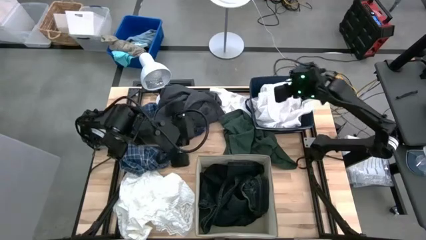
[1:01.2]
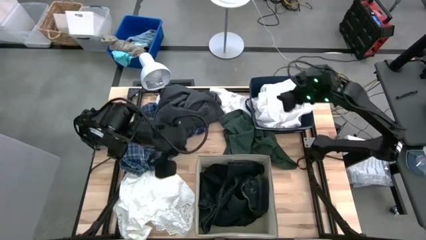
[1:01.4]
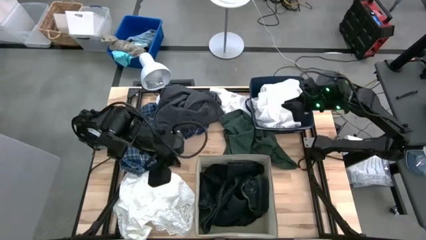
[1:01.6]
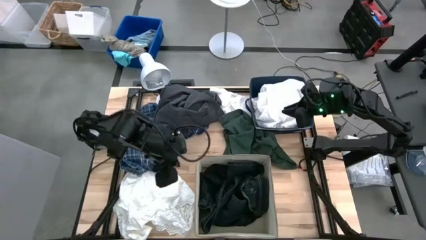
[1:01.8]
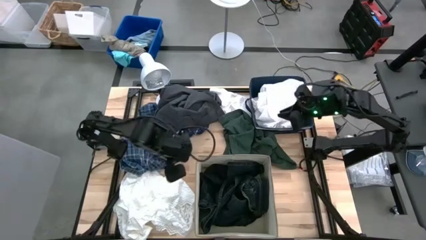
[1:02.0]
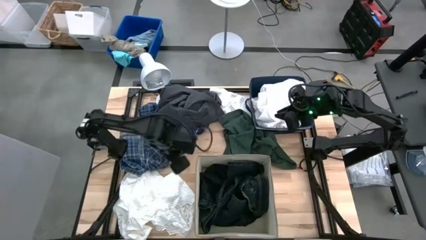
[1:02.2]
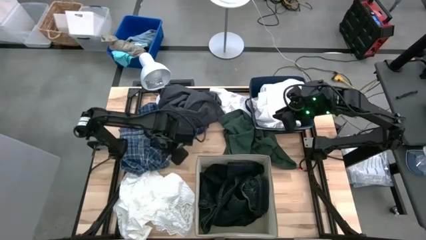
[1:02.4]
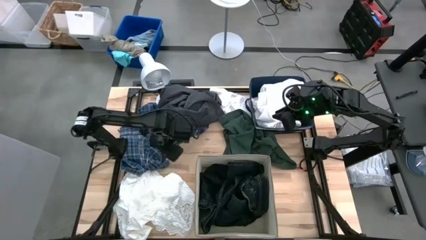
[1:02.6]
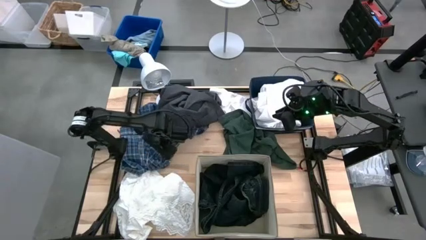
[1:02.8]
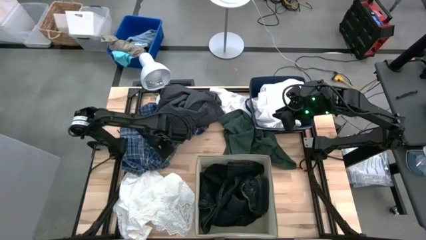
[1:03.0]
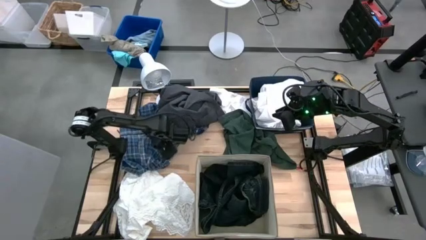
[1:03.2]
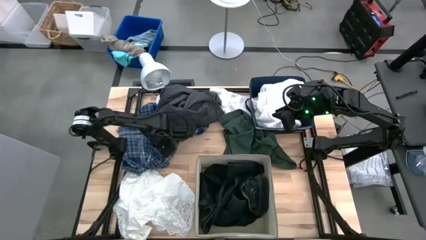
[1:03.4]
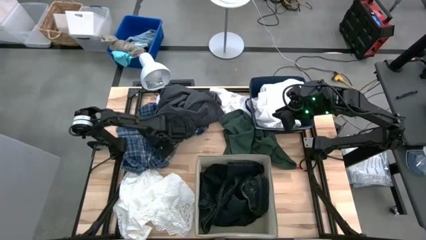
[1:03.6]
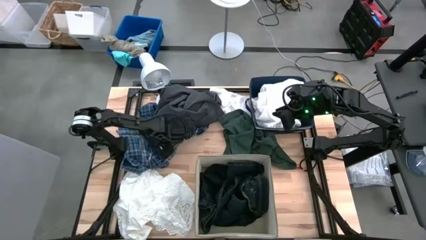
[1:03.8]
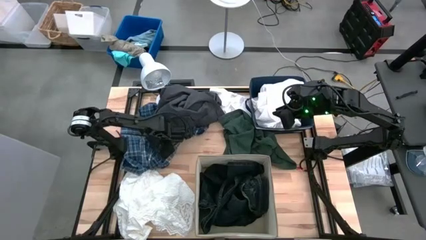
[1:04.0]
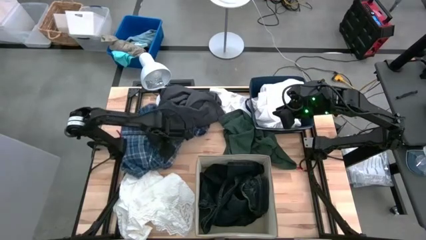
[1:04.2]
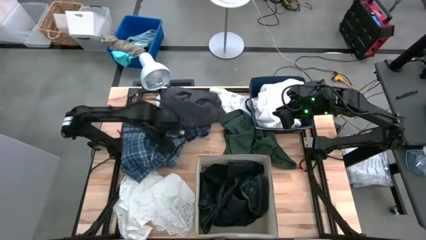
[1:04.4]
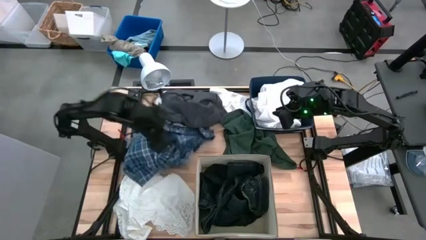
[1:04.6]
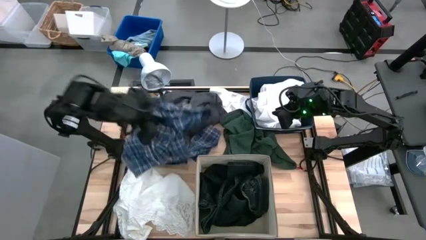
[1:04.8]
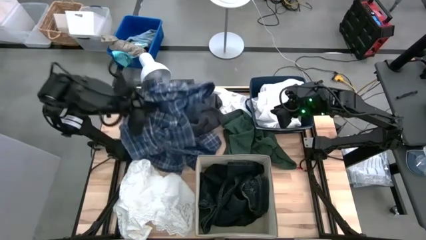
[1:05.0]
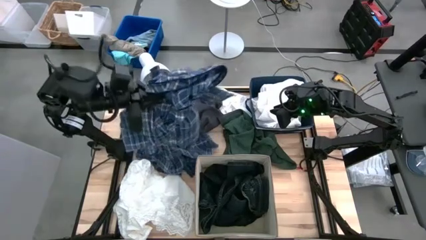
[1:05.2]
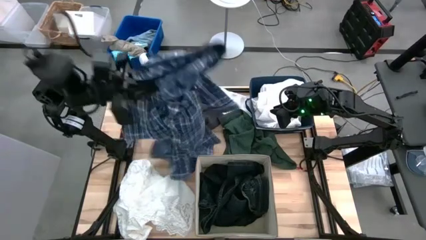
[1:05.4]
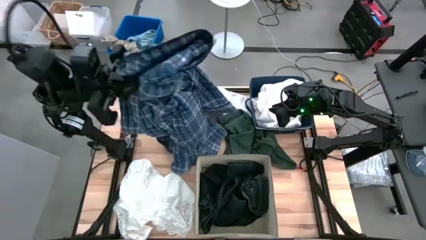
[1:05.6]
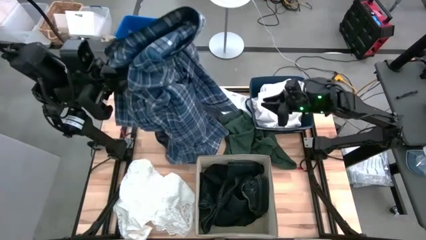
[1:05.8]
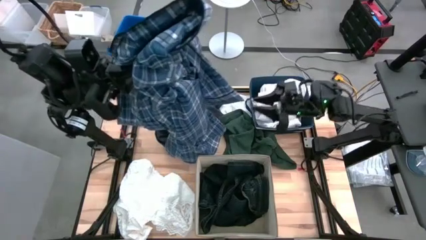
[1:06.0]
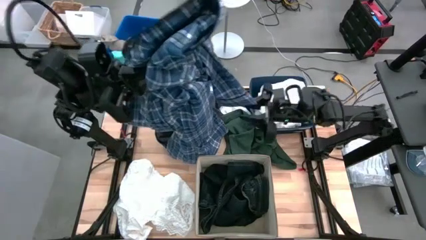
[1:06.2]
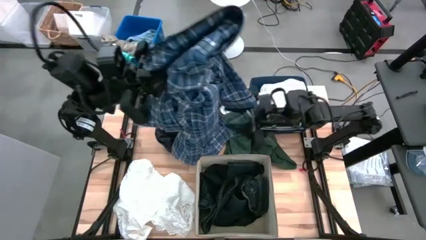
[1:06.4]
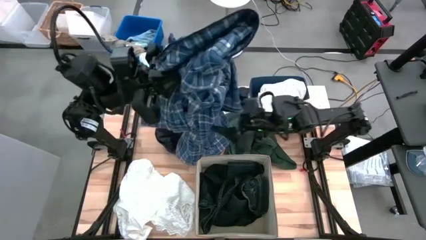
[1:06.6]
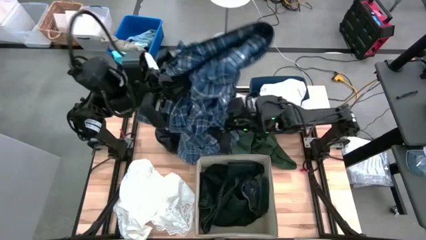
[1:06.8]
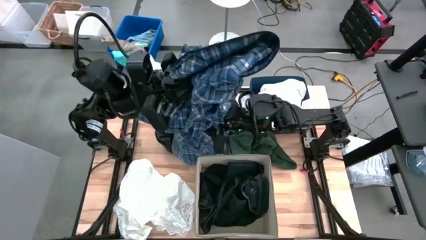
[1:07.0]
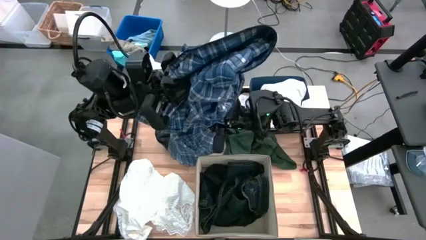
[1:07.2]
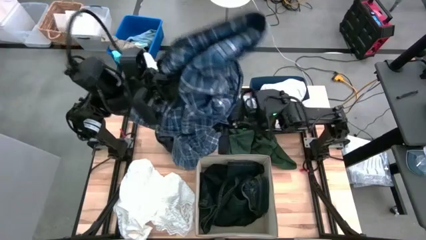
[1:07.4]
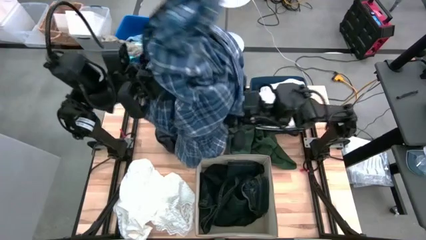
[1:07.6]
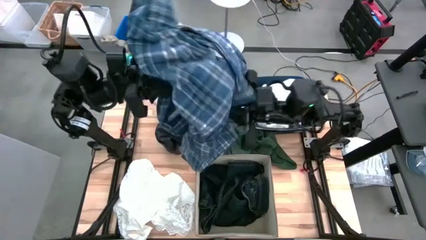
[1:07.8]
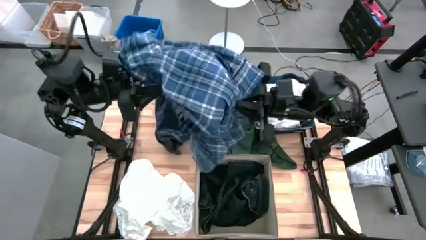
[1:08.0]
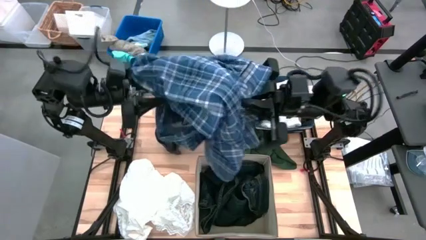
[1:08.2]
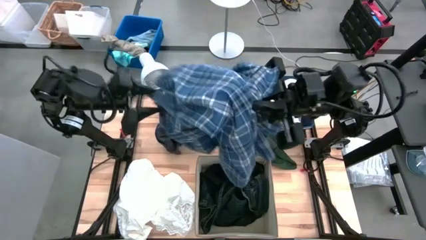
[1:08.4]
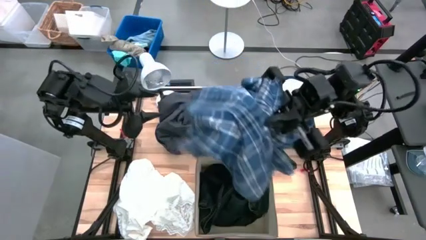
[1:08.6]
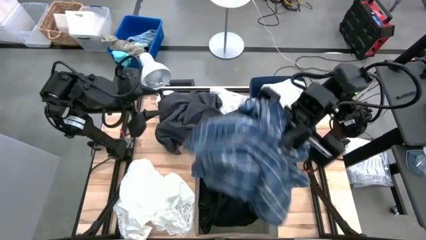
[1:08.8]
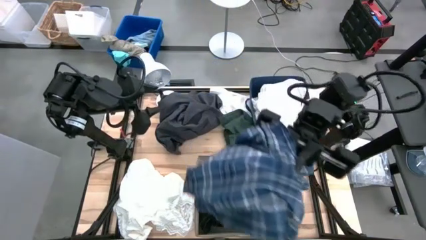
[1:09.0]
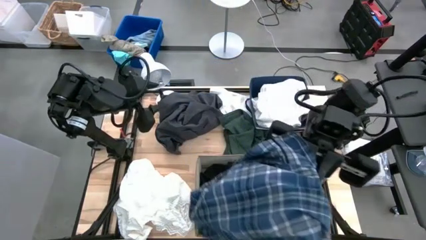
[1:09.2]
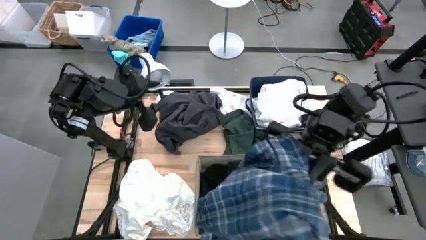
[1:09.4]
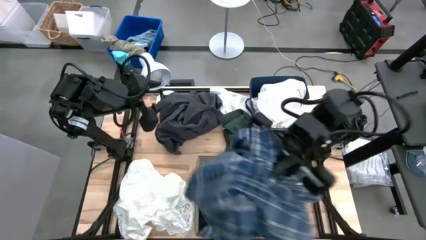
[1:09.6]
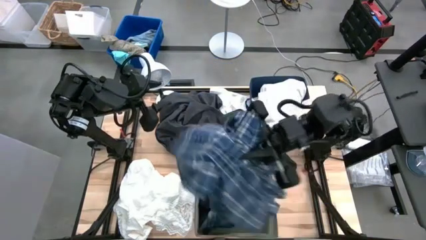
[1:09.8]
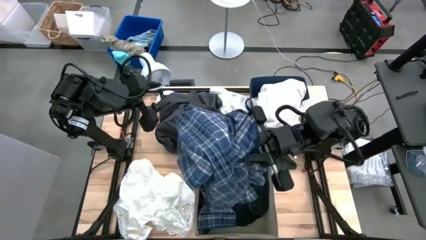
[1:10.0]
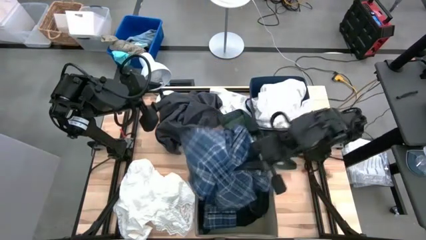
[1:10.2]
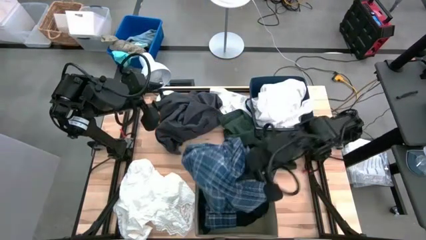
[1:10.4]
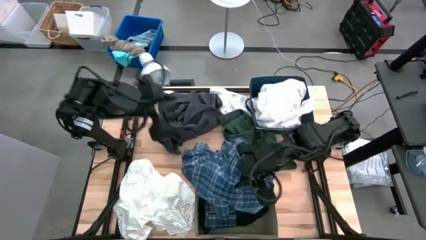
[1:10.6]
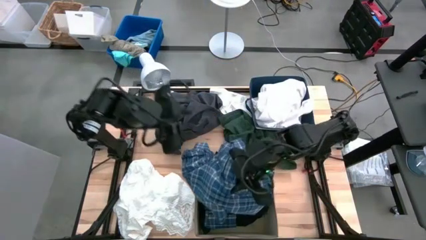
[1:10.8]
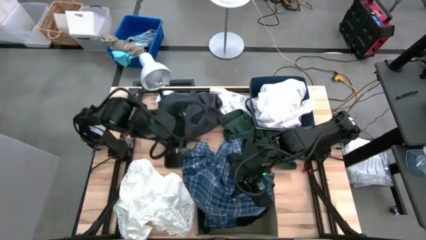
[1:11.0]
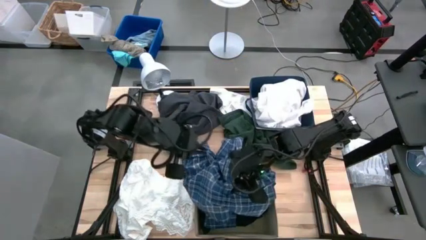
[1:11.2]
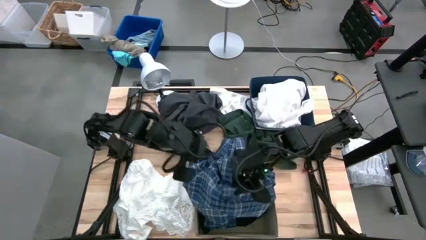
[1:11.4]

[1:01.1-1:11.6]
Task: Sort clothes
Put the blue checkered polo shirt into the brown laundry organizer

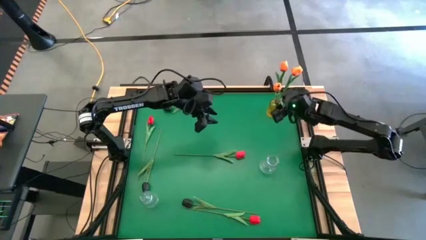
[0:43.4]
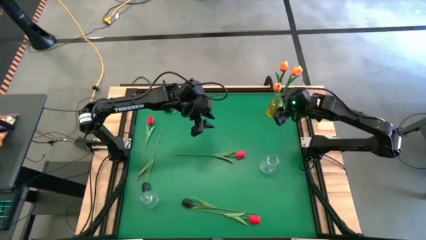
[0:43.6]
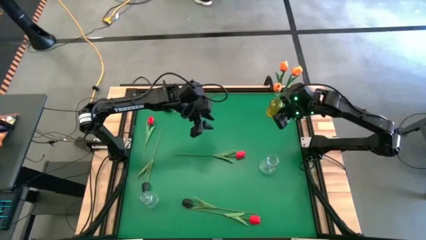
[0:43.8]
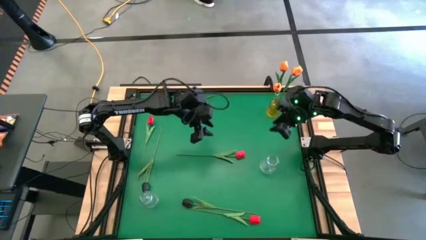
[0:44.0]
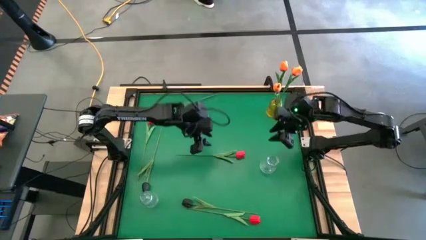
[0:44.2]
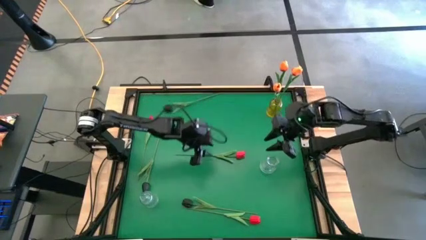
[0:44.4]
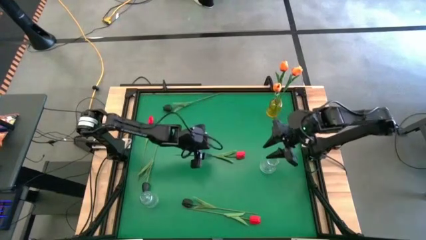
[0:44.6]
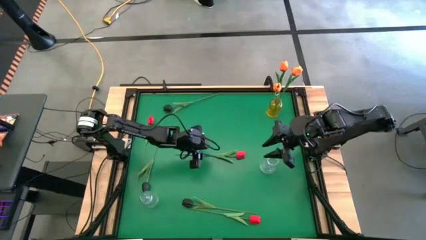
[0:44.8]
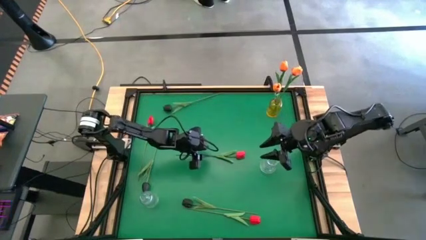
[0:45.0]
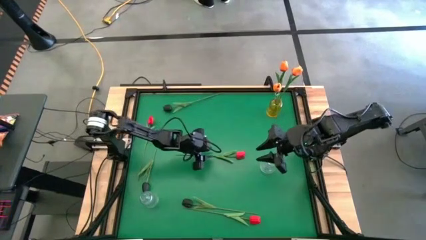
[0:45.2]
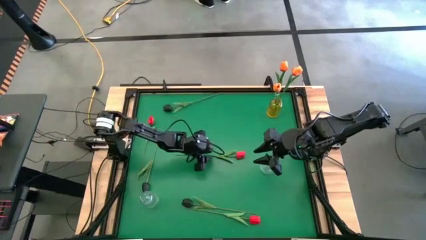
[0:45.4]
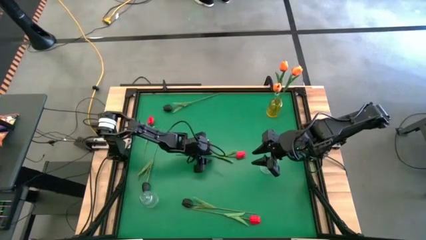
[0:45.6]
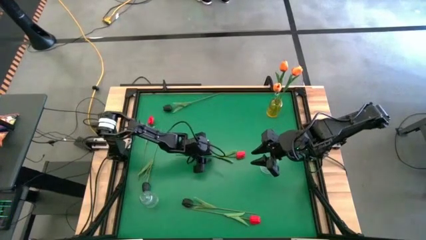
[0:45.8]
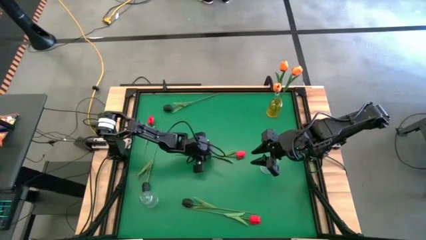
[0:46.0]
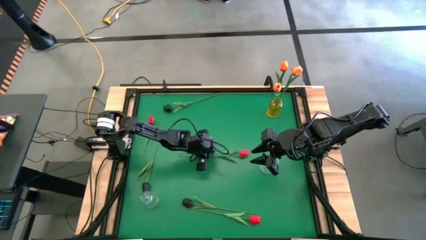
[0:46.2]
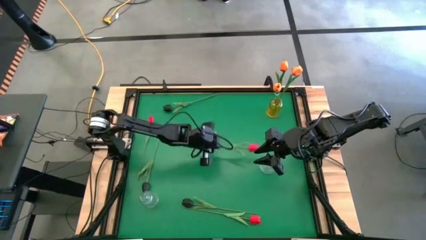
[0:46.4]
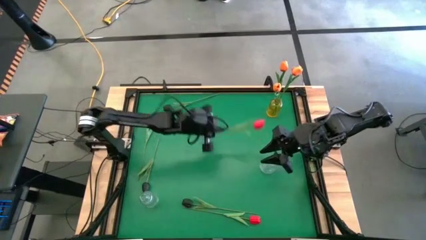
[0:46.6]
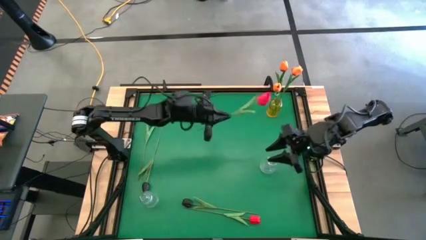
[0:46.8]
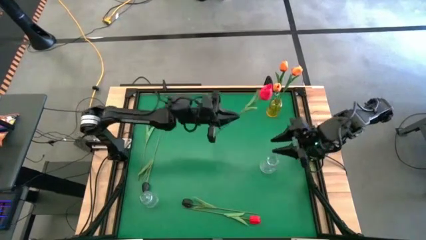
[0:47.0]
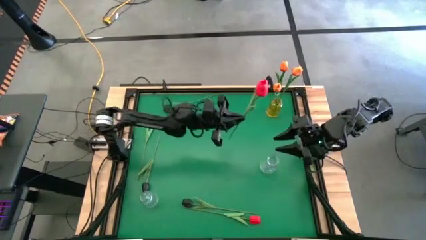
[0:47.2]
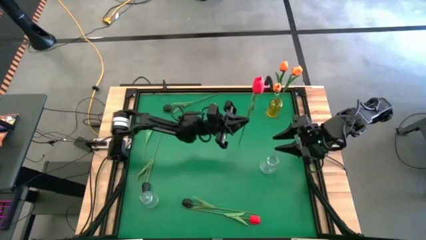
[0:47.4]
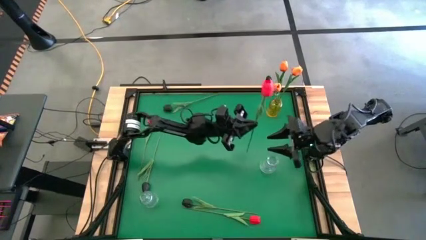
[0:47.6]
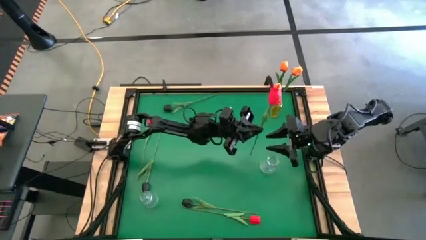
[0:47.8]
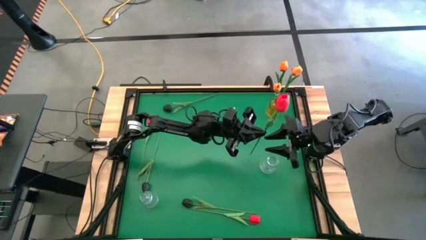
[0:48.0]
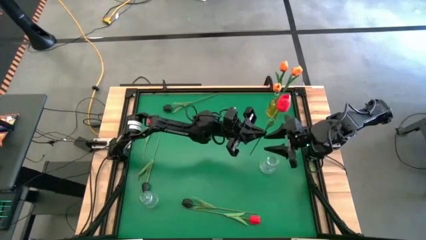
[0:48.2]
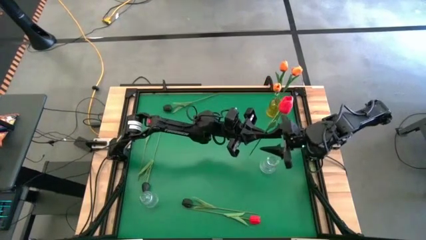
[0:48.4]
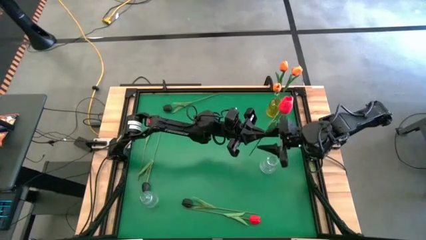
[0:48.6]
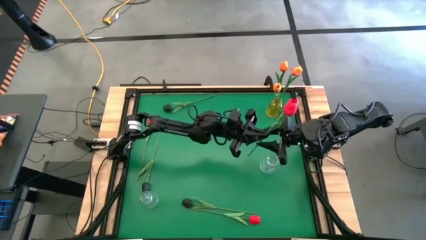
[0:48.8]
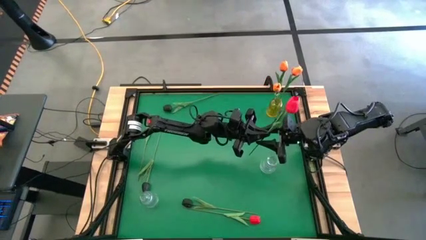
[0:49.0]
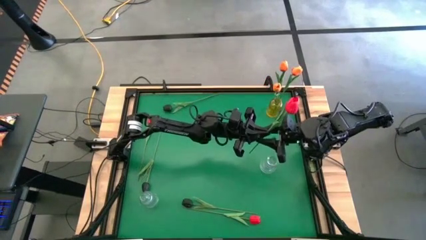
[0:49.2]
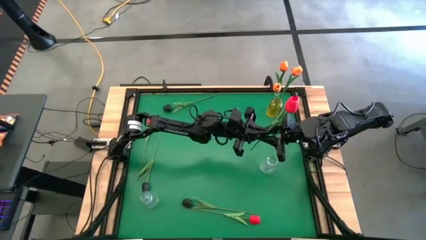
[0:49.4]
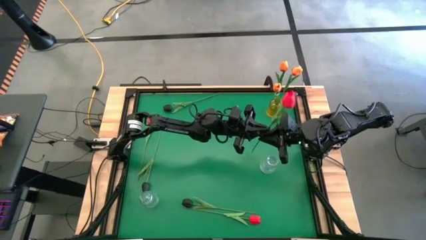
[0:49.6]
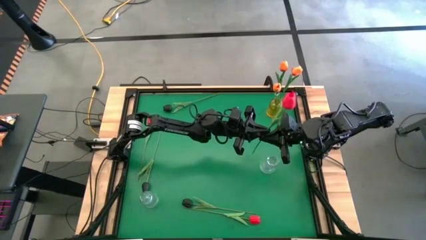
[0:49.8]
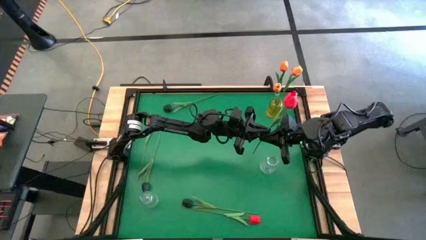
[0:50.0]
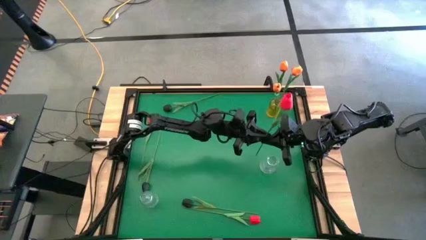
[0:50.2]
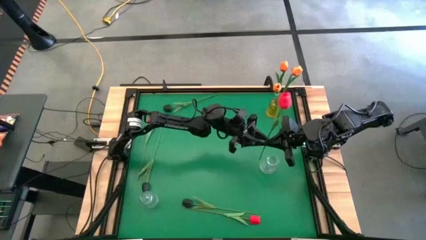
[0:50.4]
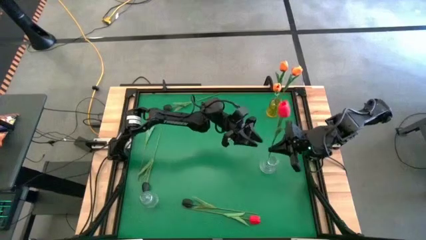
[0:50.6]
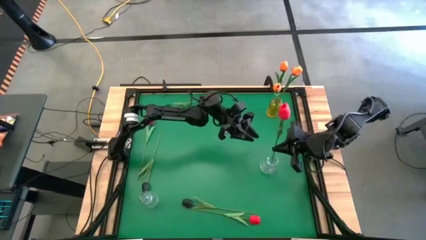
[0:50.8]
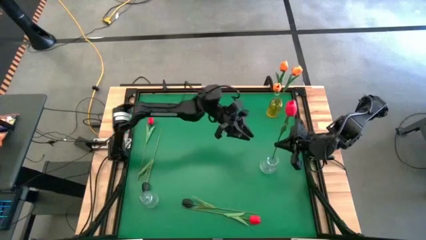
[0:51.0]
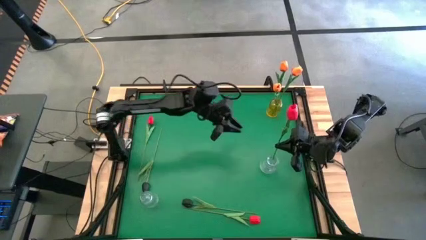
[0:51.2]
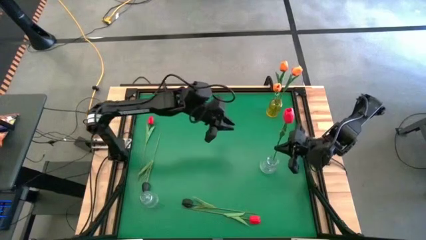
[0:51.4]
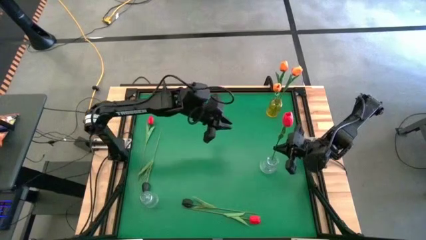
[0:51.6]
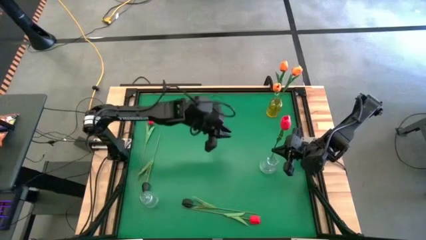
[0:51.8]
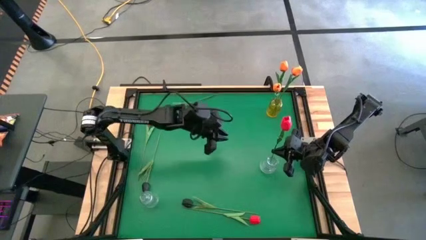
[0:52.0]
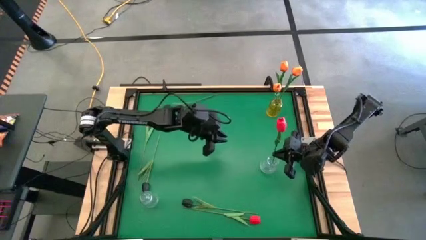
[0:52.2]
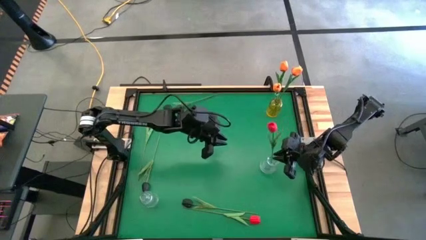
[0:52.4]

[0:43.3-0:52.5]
Task: Sort flowers into vase by color
Put the middle red tulip into the top transparent flower vase
